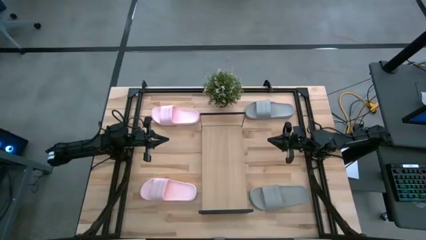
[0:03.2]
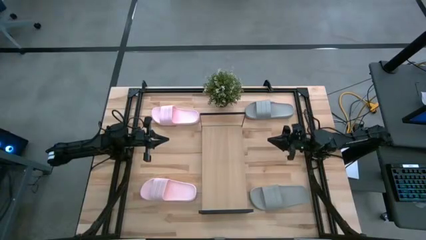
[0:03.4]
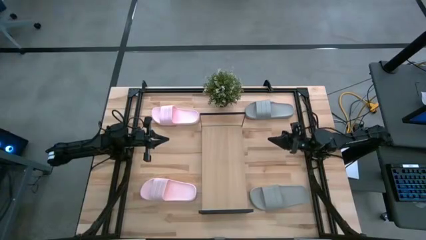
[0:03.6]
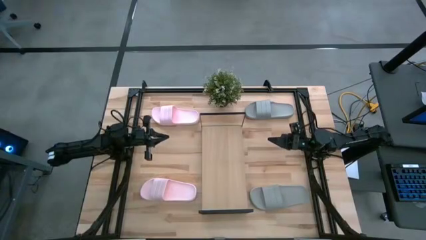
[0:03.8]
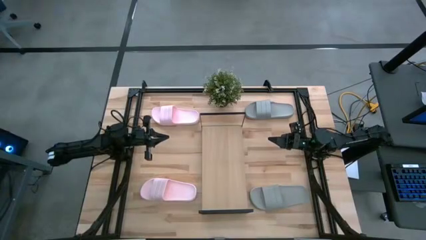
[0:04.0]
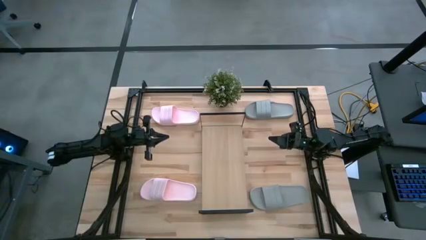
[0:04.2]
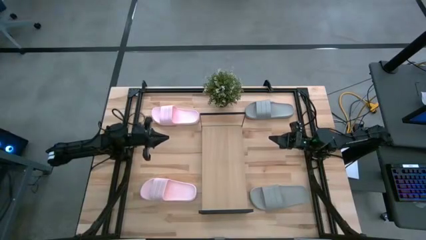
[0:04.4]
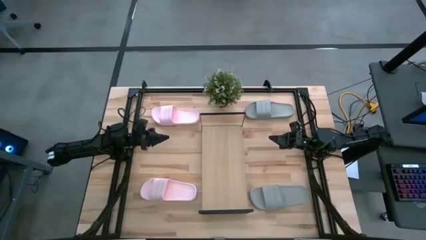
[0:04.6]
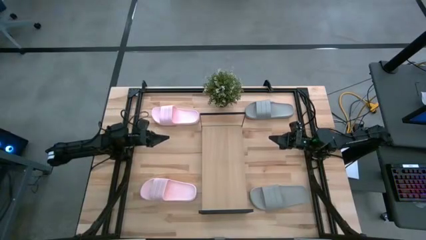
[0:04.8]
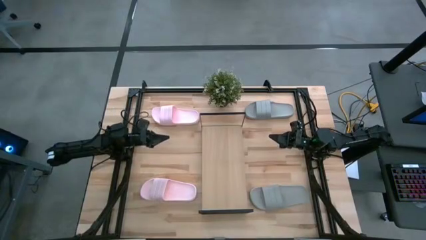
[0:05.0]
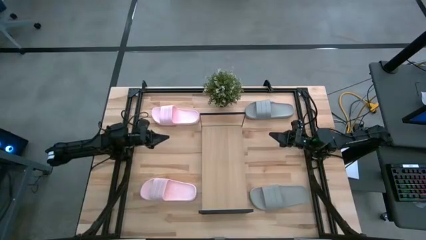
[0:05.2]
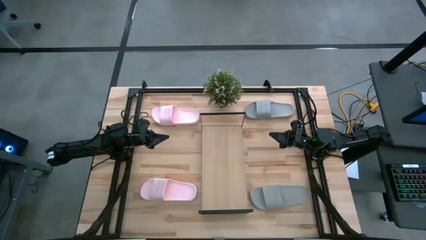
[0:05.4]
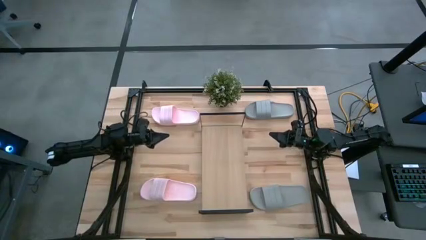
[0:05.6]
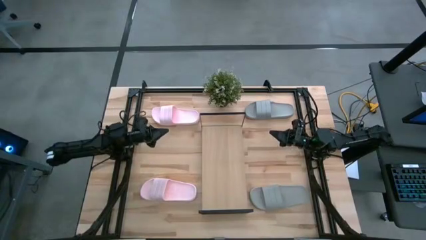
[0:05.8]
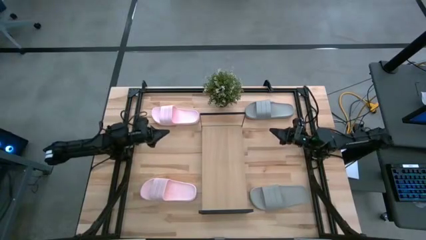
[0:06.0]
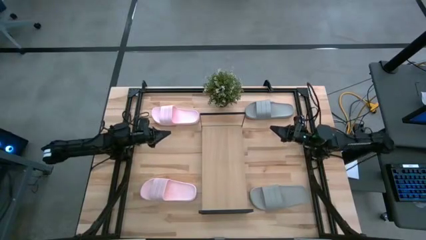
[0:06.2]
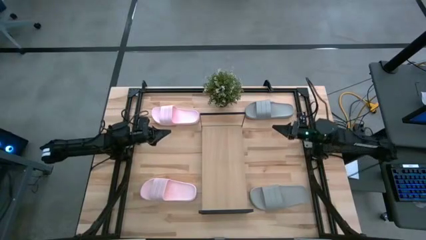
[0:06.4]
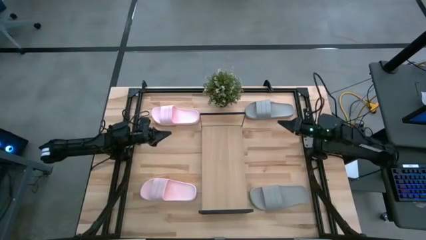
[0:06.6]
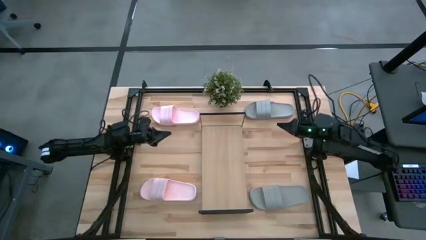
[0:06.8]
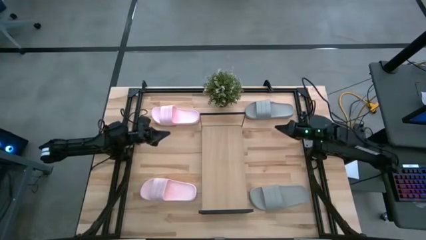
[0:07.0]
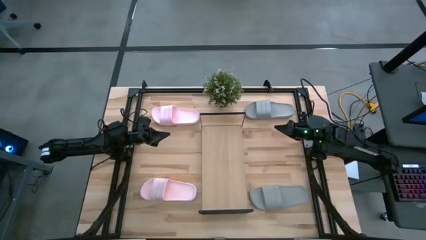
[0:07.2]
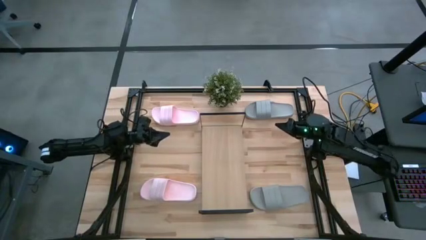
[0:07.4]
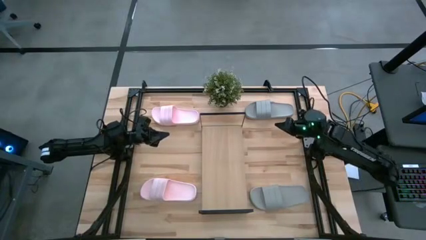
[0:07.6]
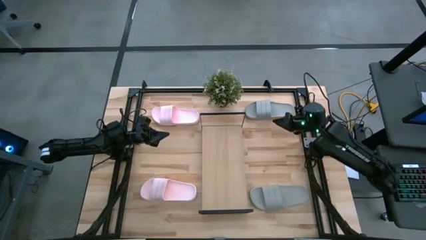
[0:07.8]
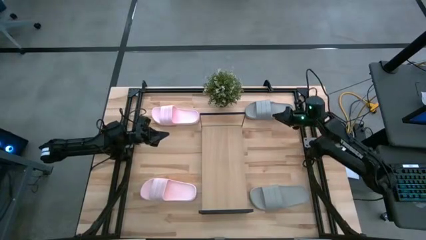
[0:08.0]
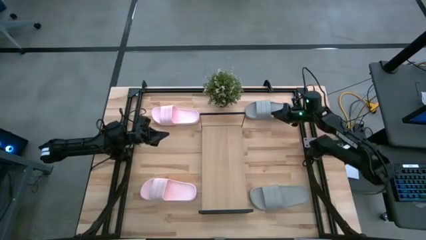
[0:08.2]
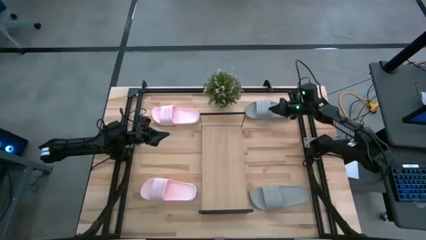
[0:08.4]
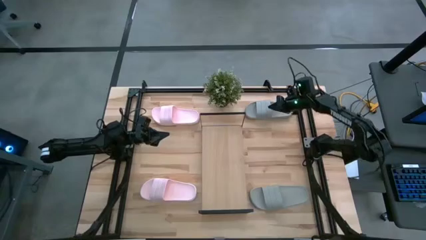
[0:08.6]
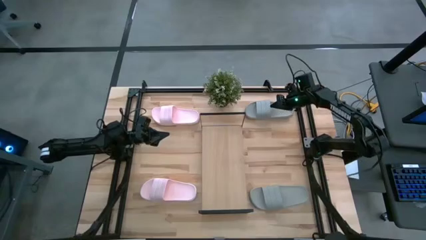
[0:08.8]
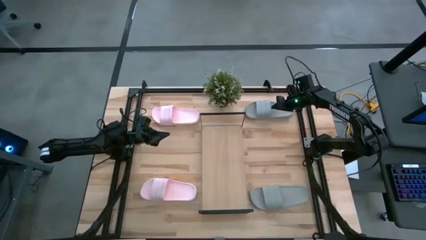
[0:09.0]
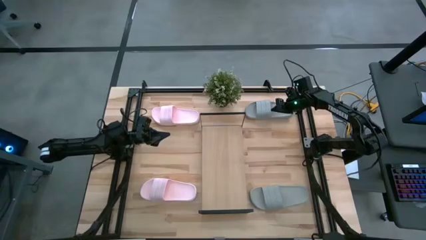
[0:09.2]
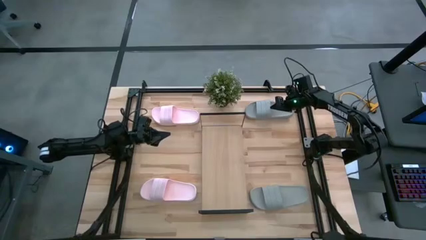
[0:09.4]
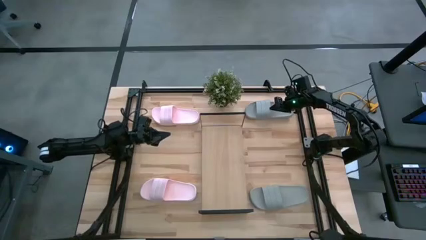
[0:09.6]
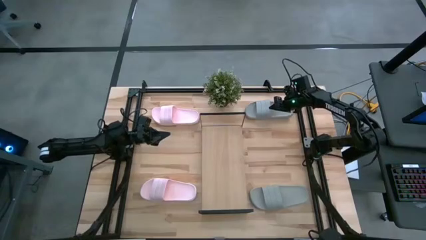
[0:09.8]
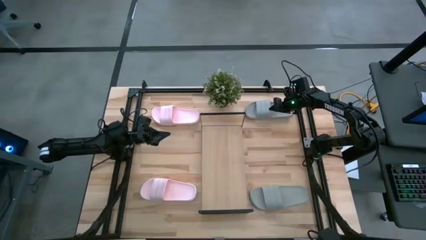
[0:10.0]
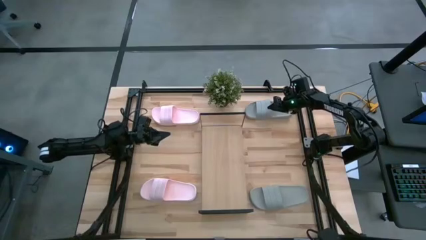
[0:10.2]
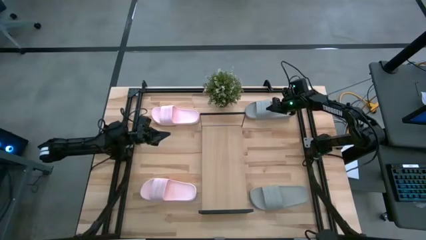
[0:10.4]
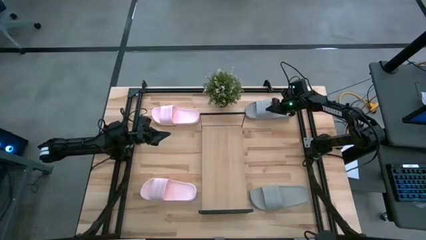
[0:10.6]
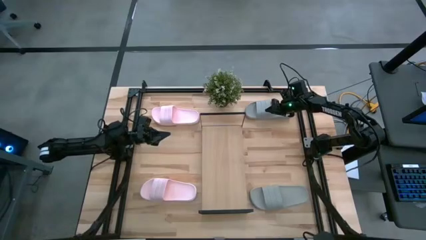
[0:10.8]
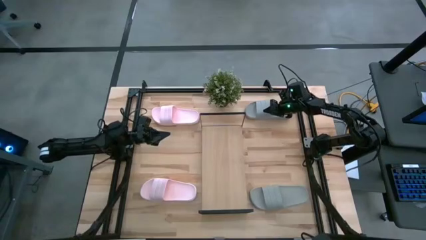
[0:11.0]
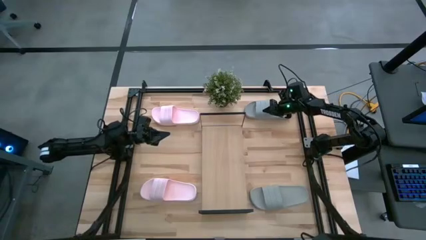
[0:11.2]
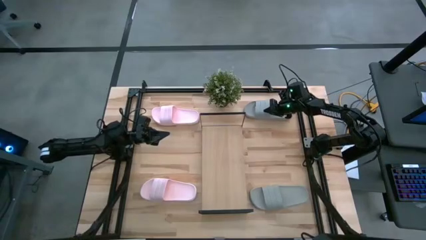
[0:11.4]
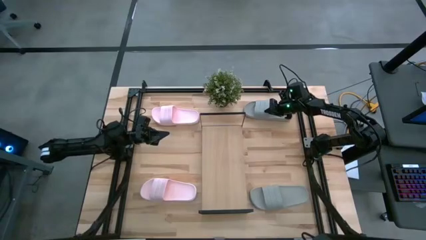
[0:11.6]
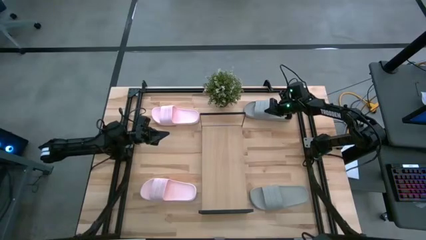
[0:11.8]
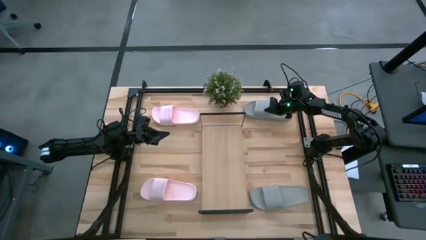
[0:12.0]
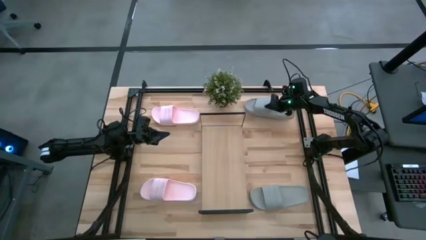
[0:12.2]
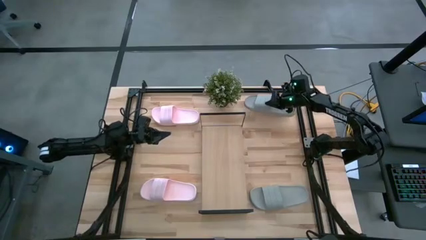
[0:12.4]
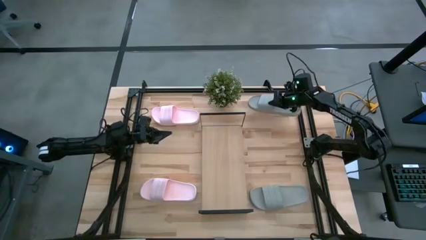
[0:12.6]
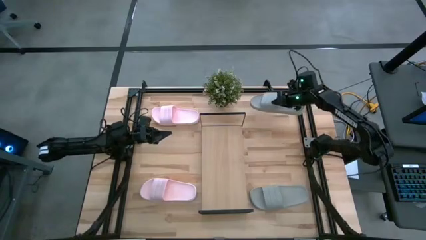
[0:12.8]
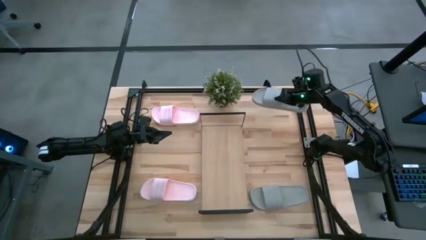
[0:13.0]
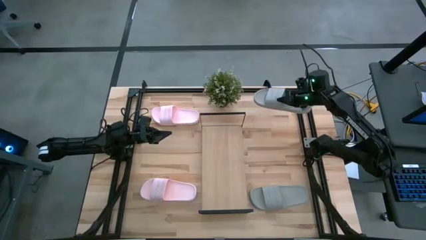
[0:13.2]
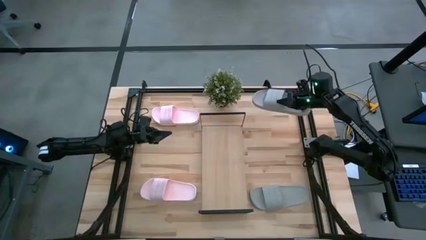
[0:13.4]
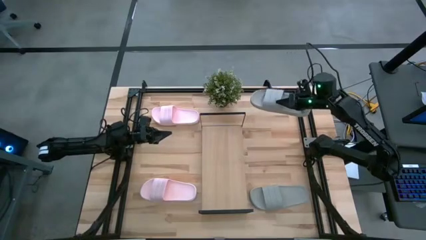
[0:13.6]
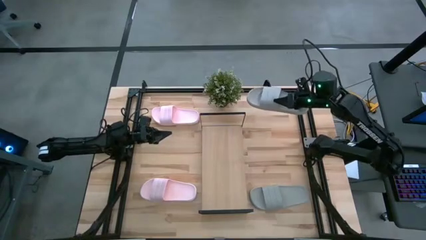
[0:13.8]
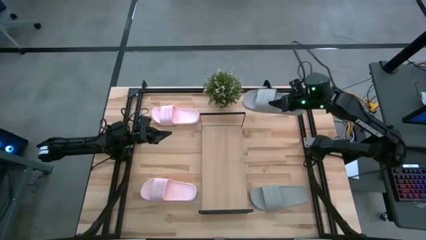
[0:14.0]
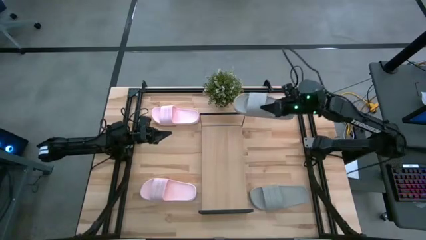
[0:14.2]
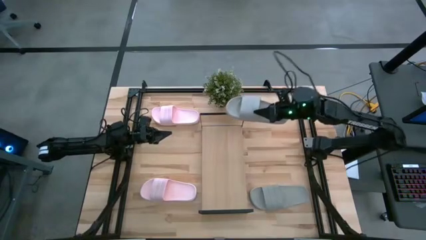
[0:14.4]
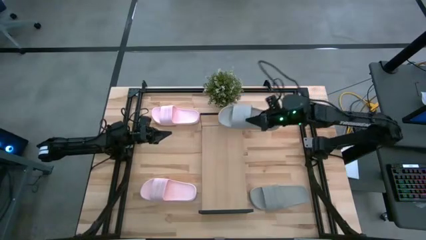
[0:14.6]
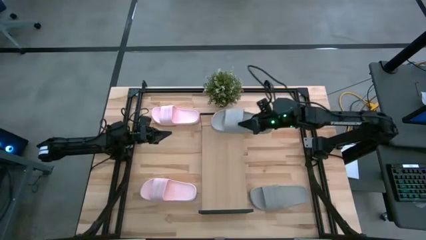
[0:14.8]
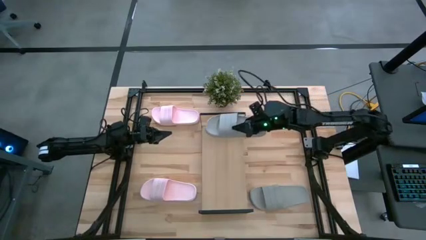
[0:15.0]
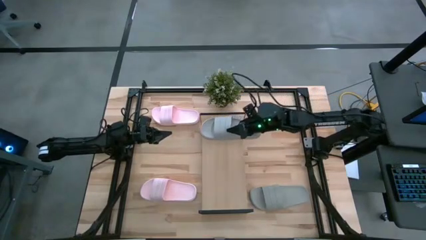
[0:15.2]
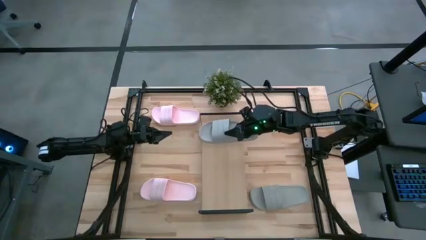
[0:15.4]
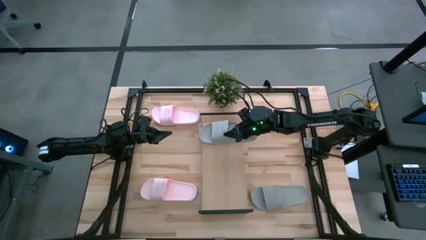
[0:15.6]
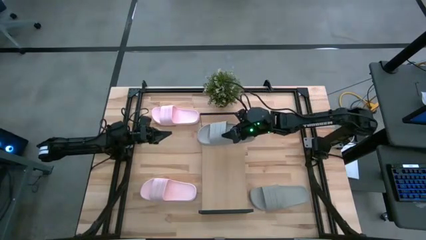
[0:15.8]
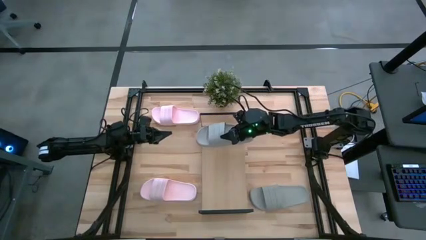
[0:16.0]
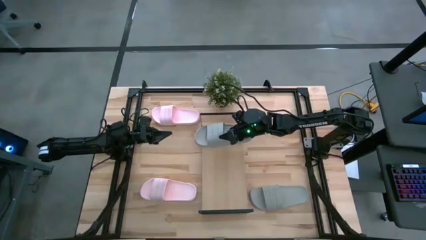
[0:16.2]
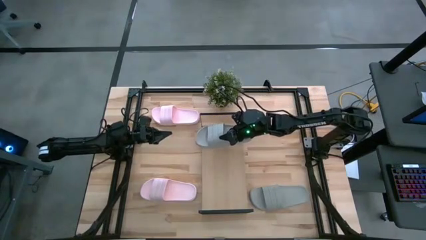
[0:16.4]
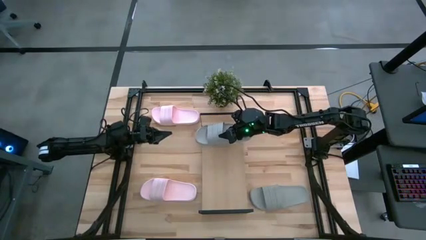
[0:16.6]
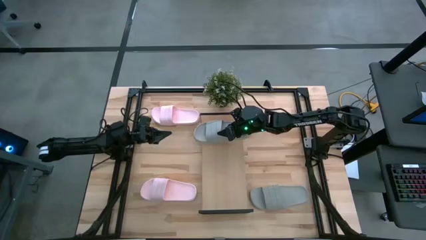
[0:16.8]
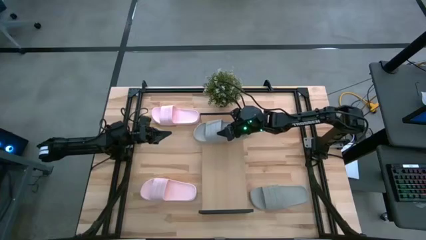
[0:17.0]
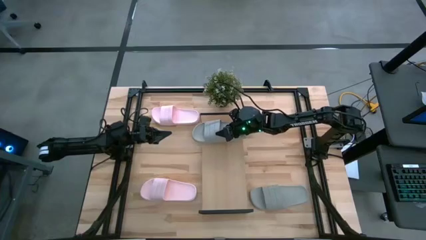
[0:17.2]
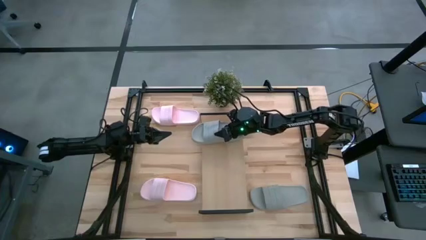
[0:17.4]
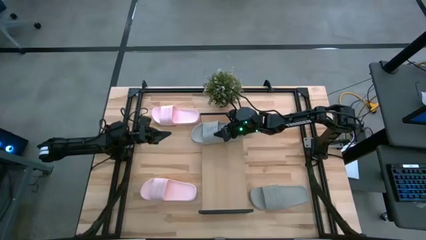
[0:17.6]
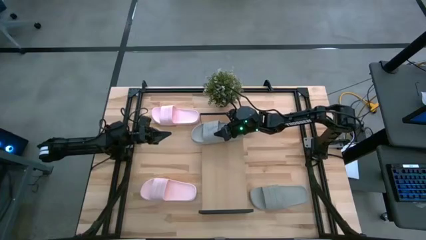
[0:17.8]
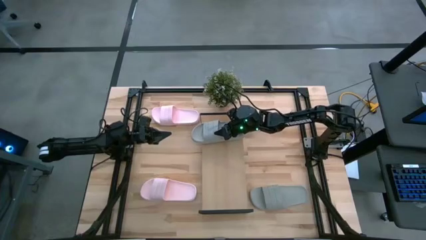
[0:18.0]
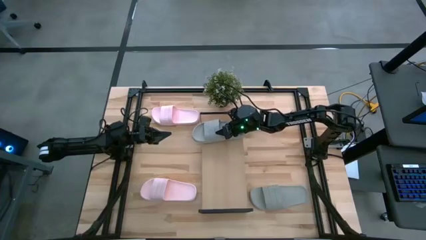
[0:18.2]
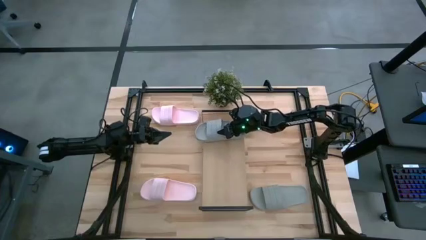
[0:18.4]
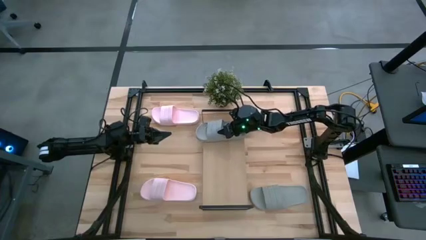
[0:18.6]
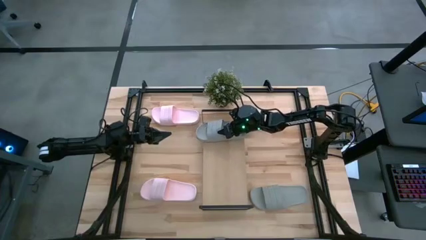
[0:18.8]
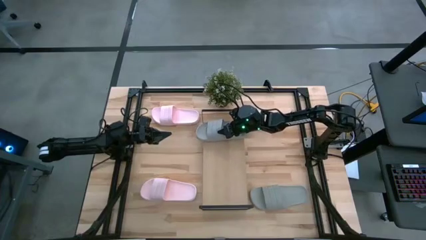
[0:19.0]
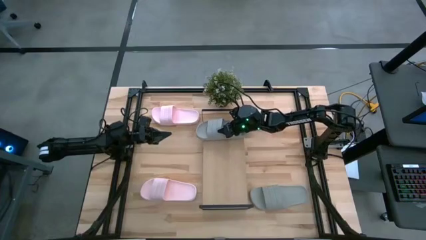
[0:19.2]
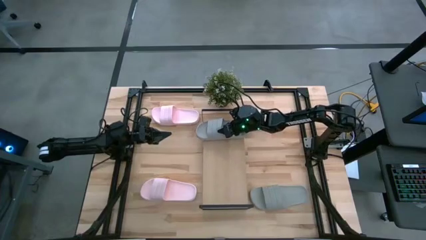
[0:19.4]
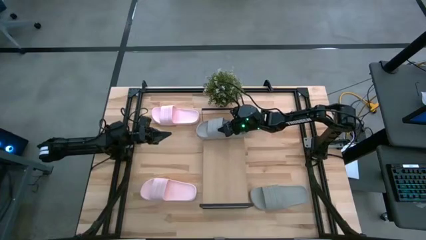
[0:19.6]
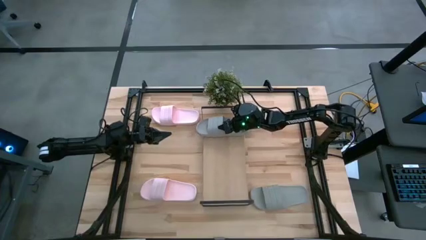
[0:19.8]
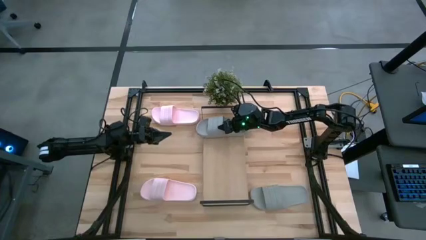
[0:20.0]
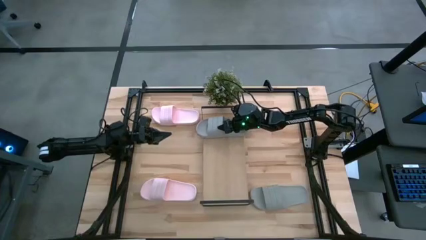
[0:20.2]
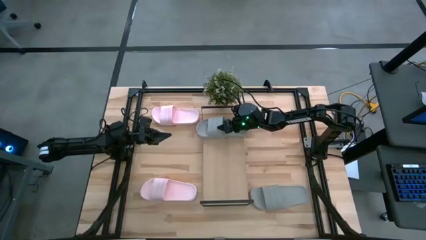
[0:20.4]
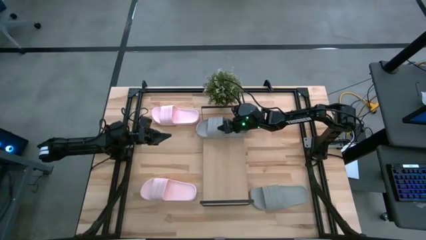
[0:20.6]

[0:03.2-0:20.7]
Task: Pick and place slides into the shelf
Put the top gray slide on the shelf
